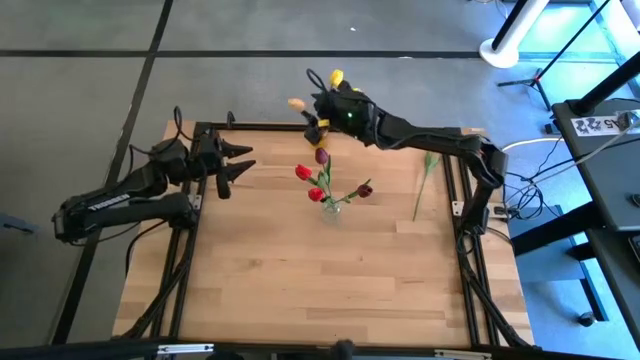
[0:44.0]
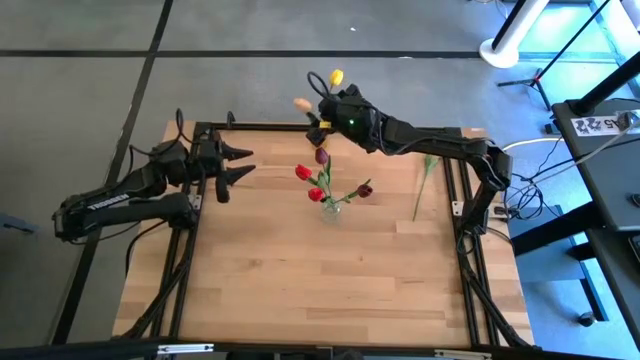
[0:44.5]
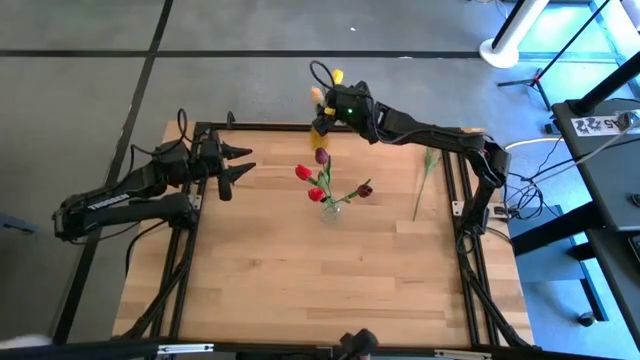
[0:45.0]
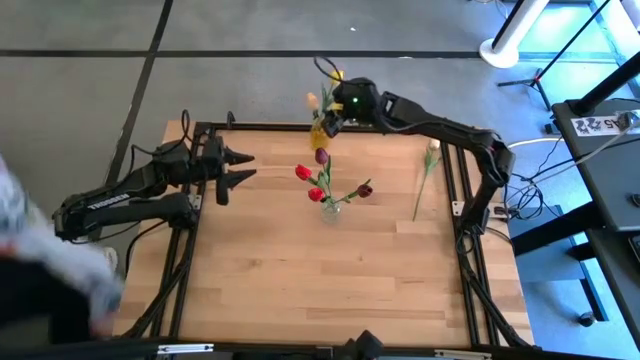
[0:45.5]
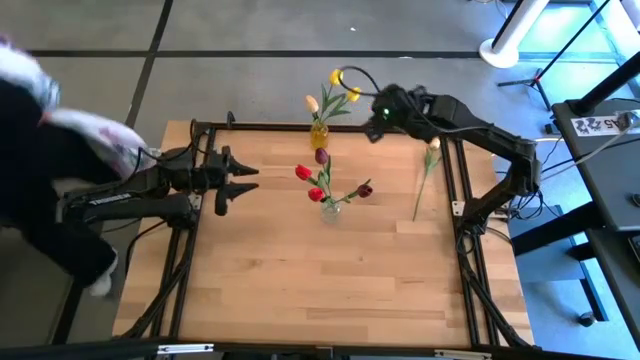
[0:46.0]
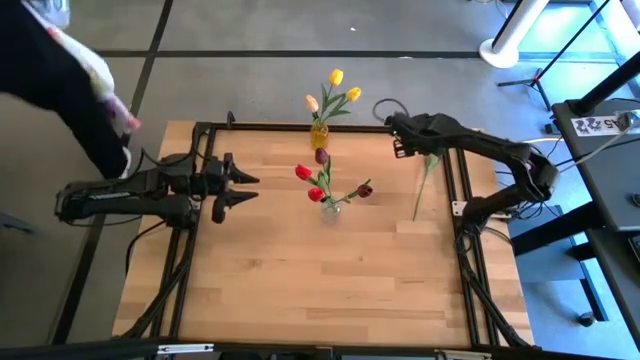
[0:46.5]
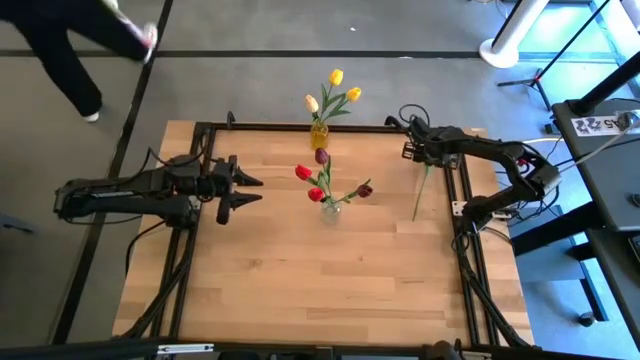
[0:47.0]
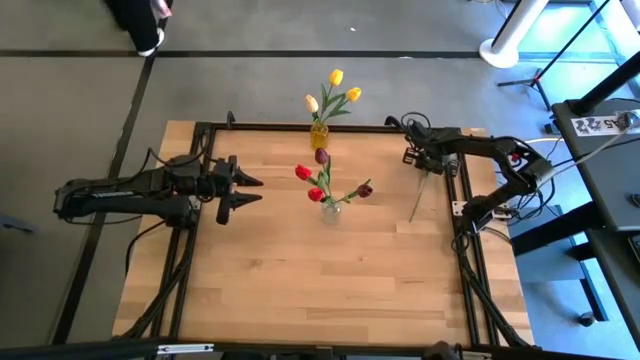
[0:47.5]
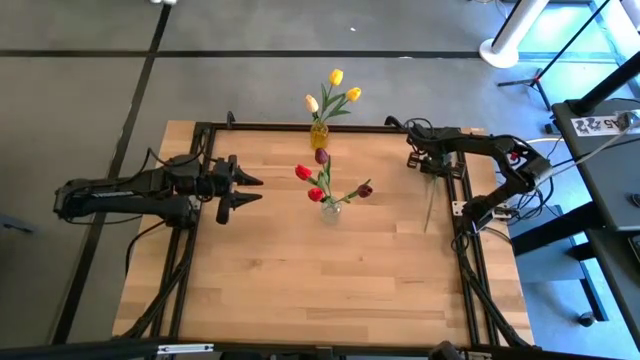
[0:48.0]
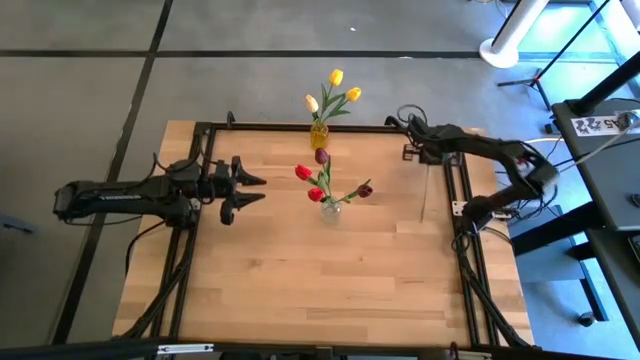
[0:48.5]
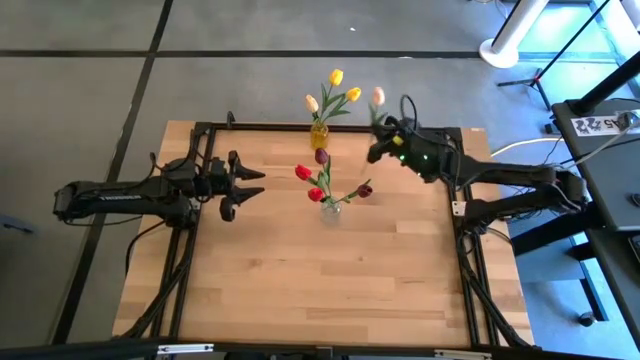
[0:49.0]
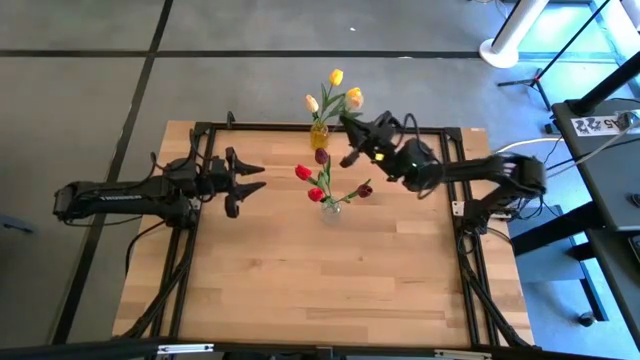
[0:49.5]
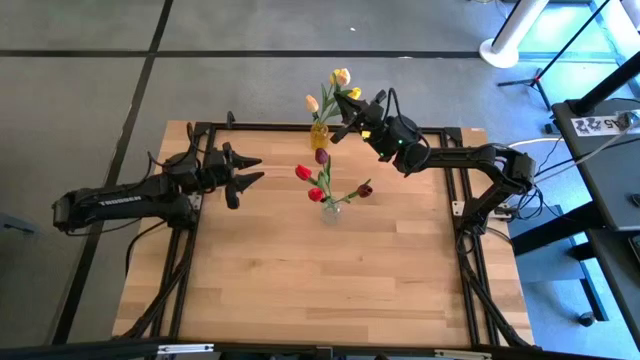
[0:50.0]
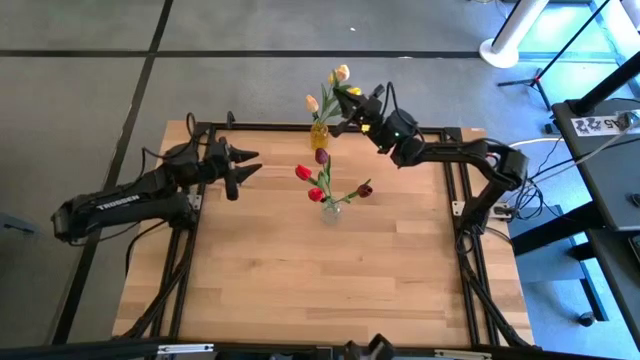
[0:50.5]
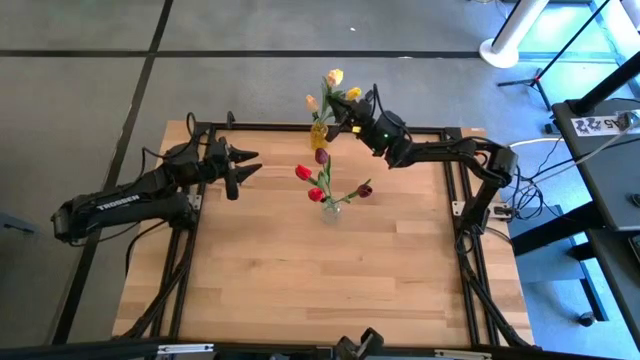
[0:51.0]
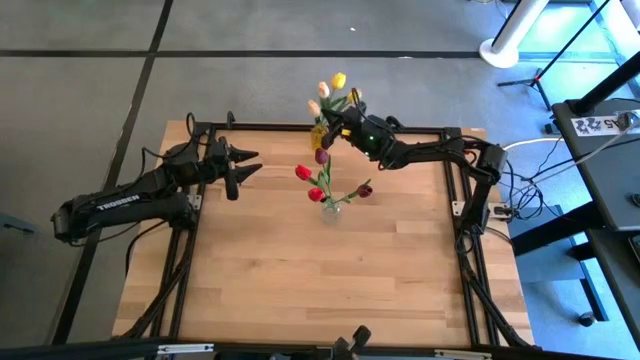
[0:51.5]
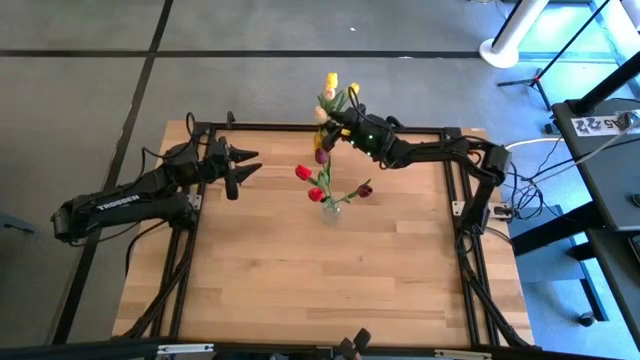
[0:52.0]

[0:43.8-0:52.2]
Task: Sort flowers into vase by color
Put the white tulip into the yellow vase

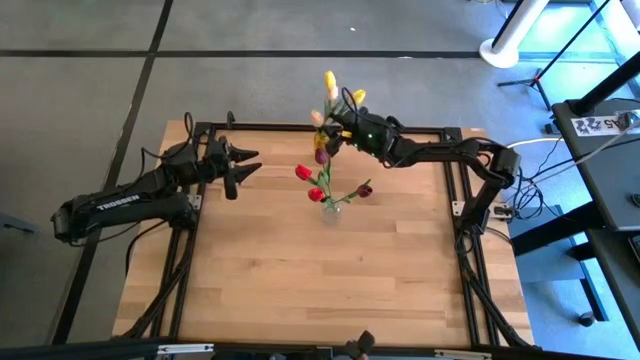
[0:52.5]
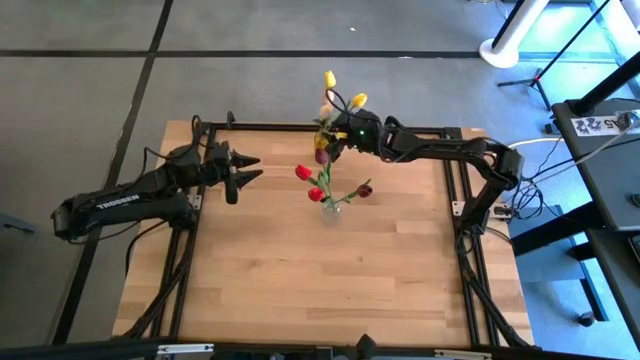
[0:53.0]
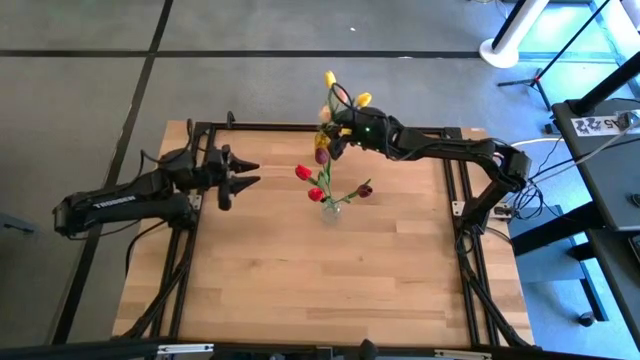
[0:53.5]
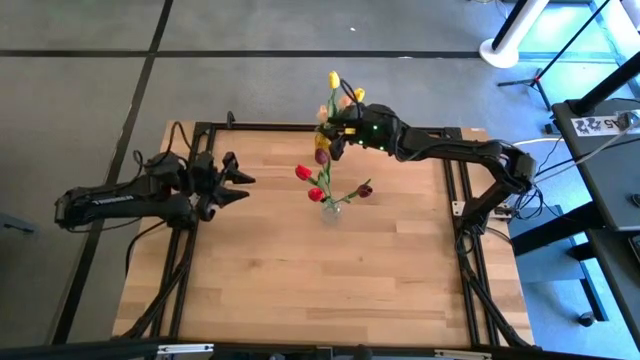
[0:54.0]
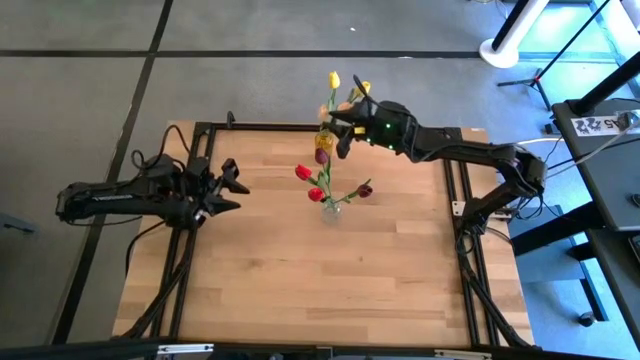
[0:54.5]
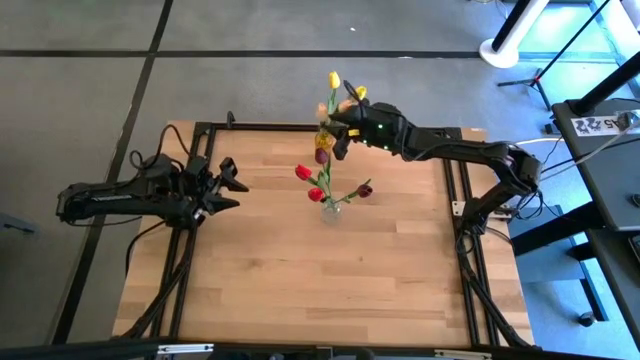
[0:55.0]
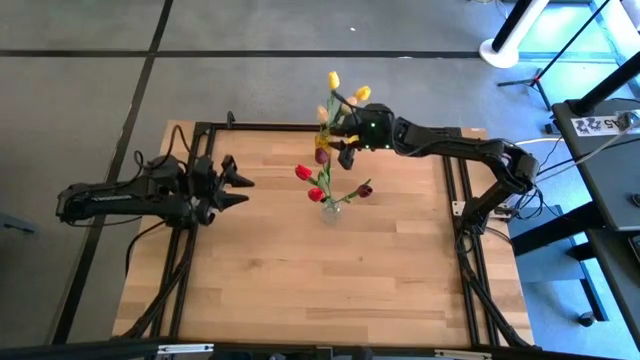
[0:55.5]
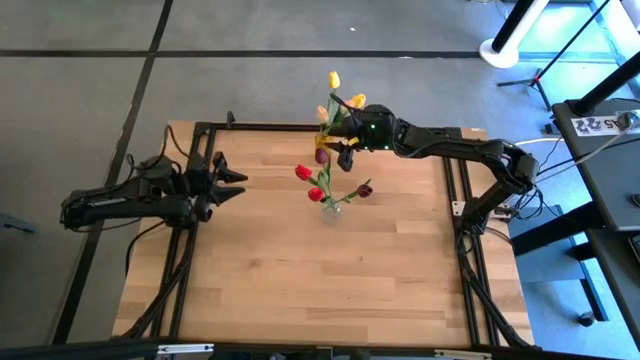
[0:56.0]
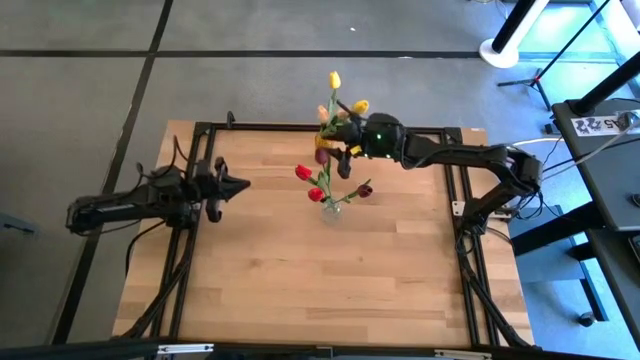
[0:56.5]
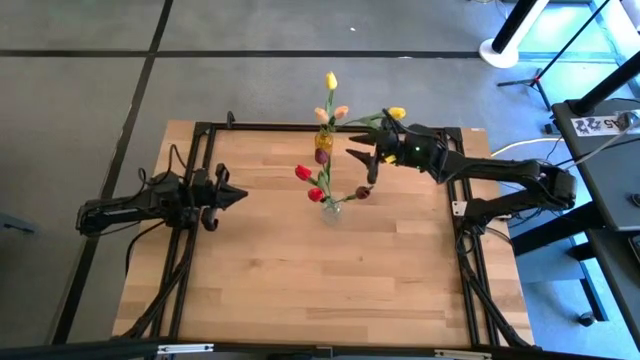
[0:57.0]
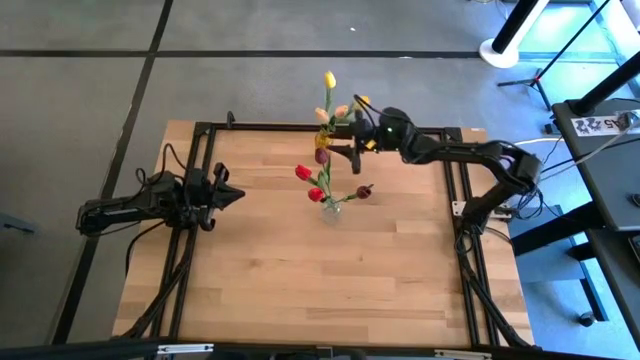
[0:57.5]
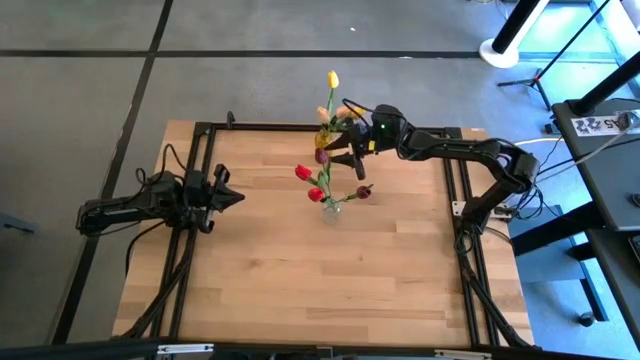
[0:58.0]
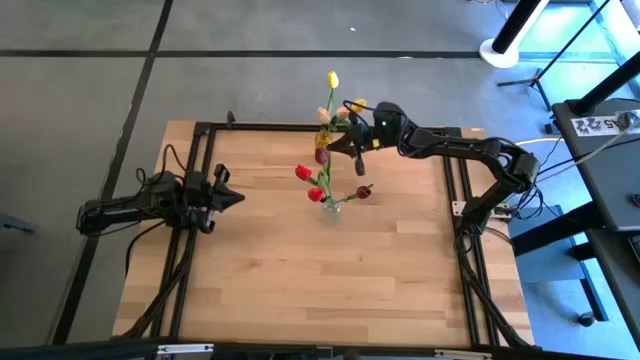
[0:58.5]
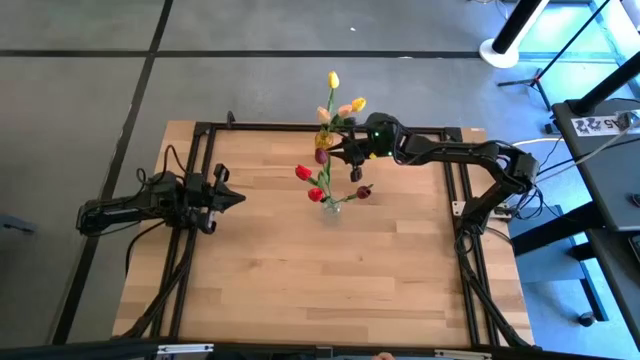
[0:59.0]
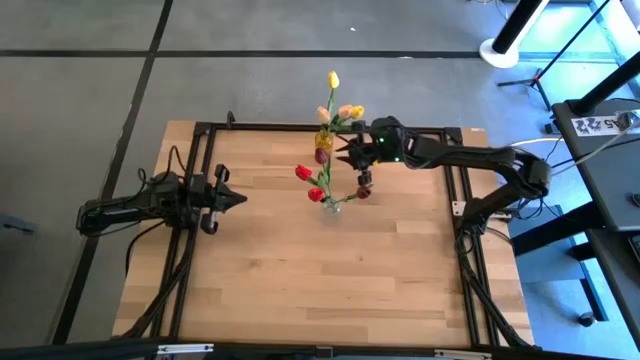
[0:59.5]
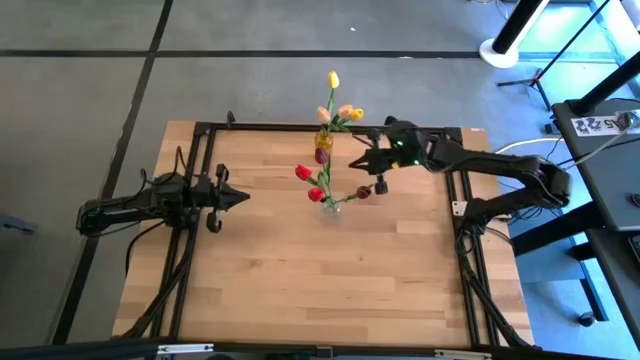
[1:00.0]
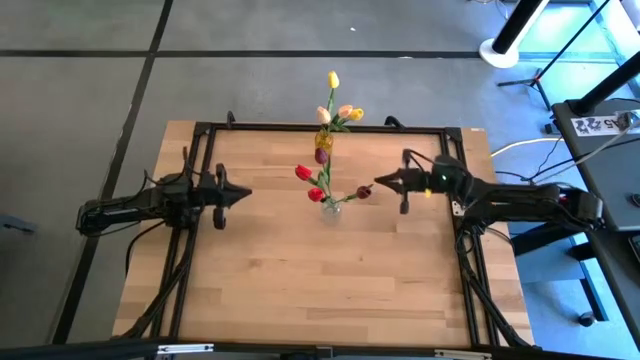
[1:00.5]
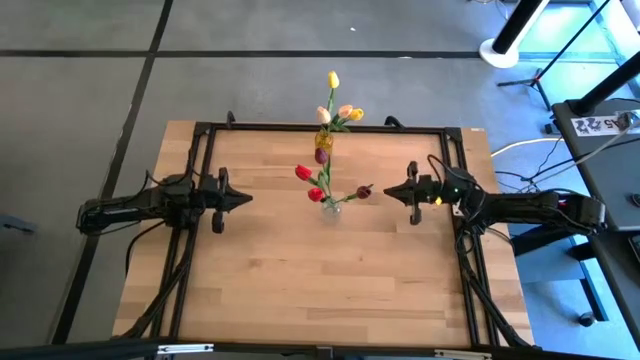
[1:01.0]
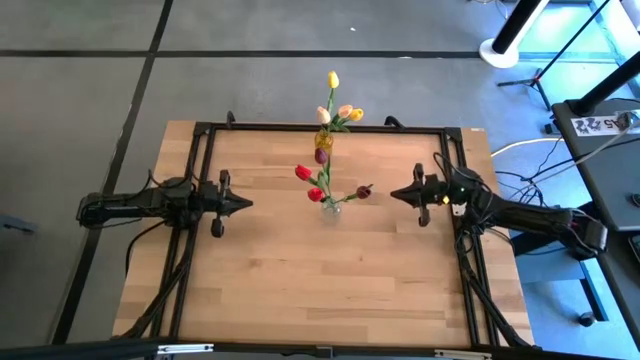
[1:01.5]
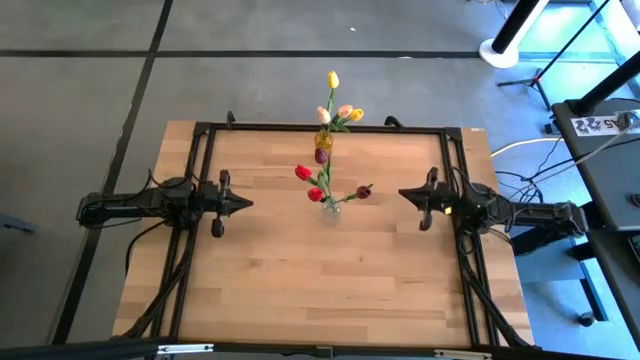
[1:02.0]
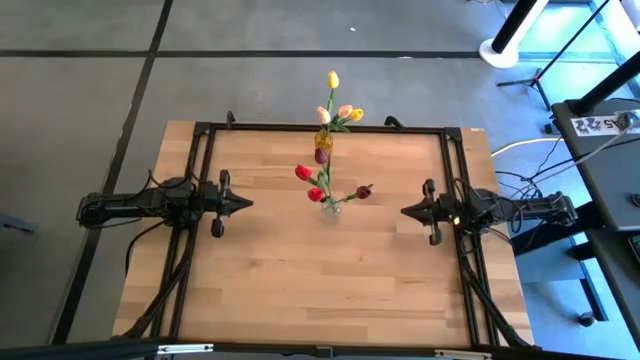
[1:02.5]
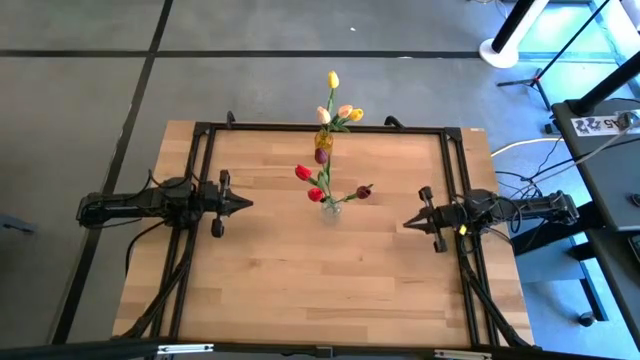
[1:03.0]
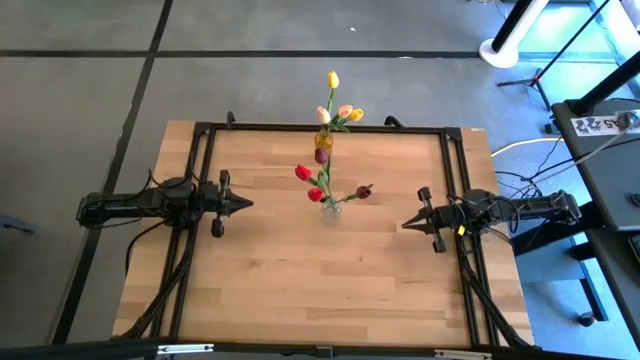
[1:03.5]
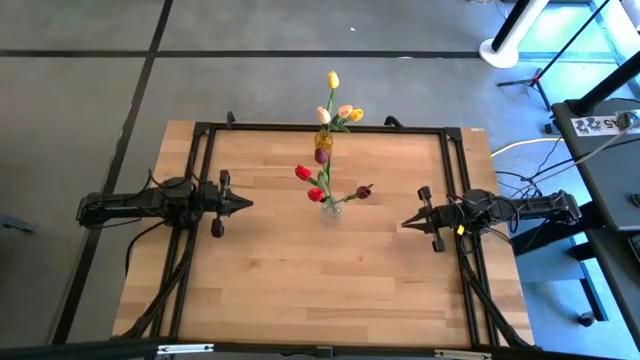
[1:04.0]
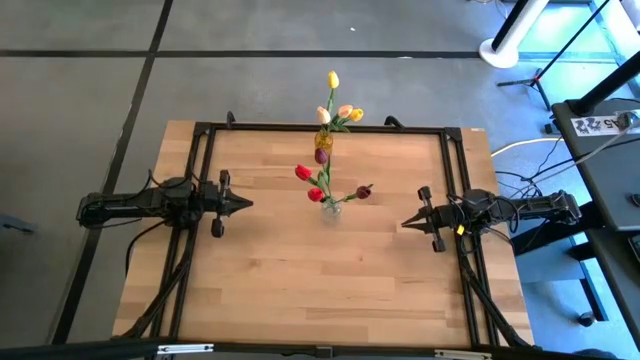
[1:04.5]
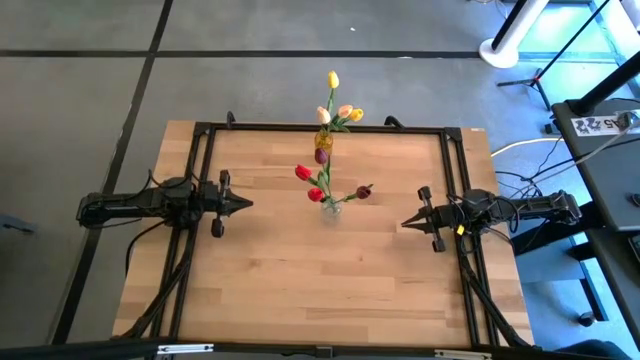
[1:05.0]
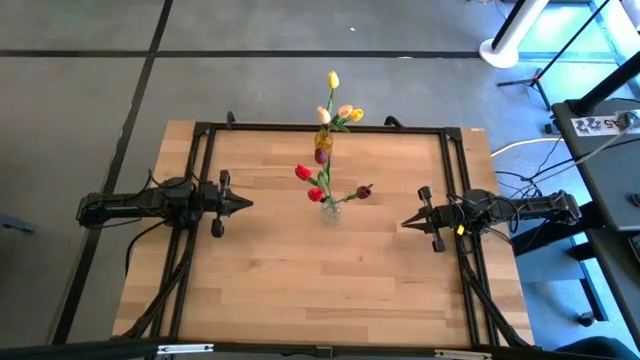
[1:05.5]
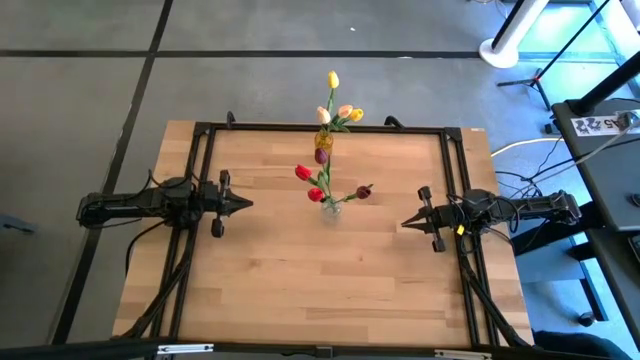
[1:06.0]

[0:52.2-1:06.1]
Return to Home Position
